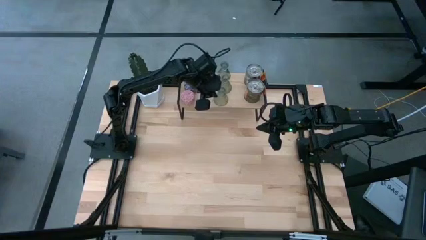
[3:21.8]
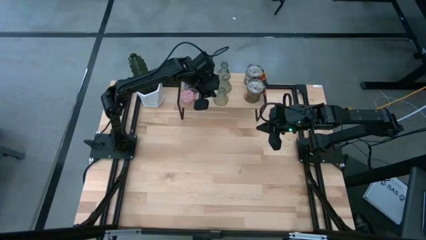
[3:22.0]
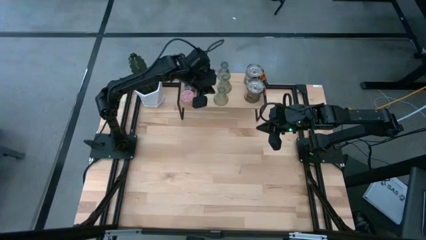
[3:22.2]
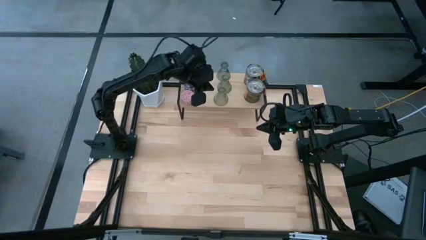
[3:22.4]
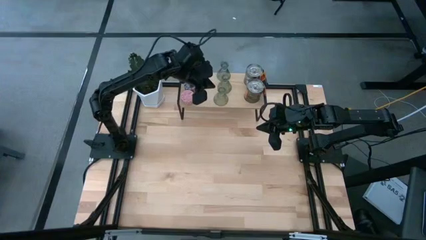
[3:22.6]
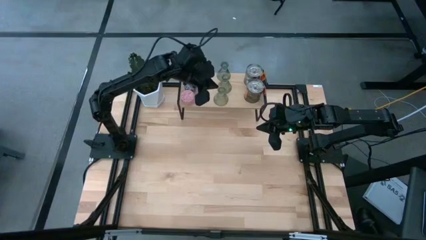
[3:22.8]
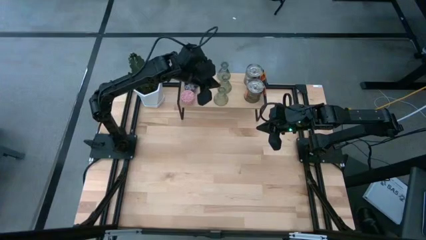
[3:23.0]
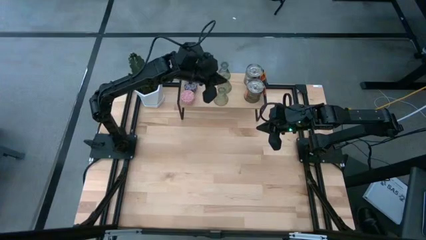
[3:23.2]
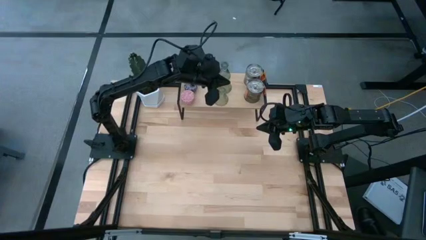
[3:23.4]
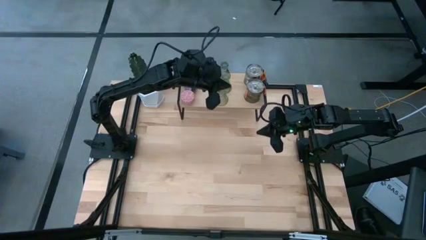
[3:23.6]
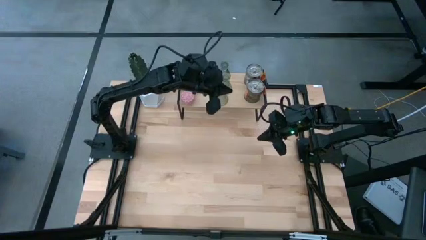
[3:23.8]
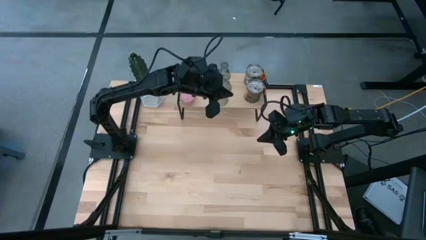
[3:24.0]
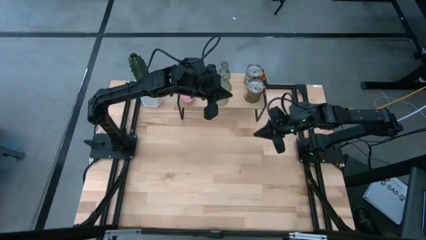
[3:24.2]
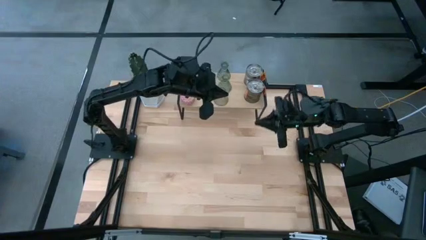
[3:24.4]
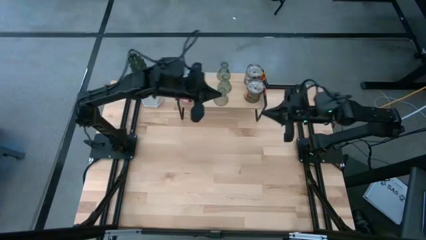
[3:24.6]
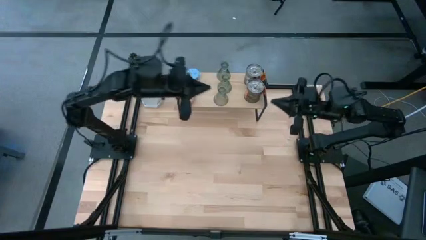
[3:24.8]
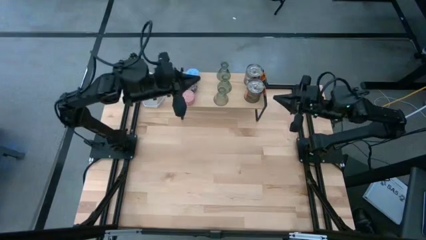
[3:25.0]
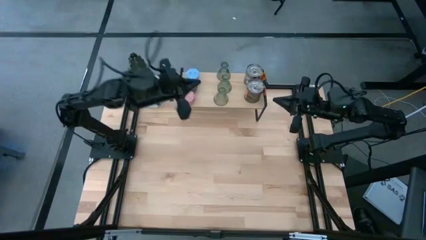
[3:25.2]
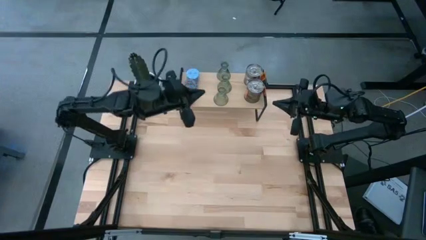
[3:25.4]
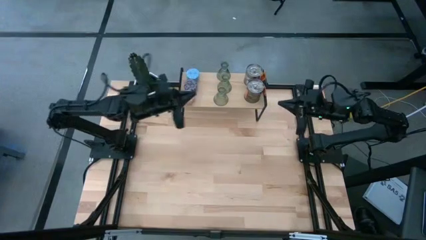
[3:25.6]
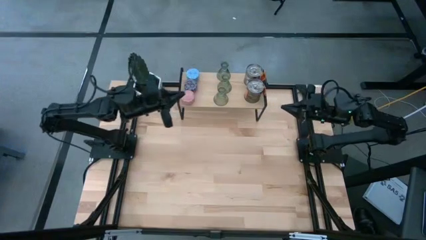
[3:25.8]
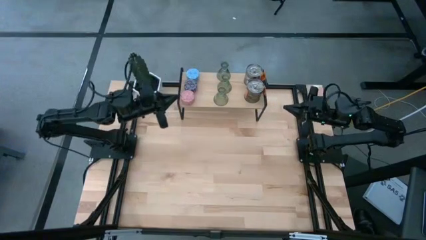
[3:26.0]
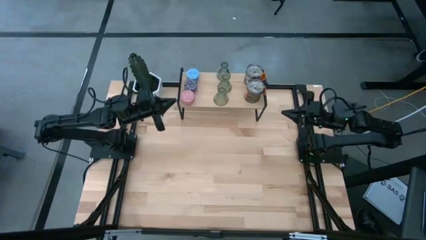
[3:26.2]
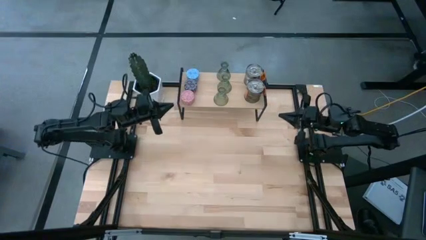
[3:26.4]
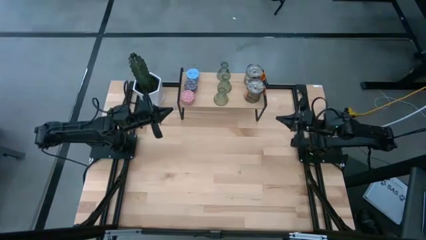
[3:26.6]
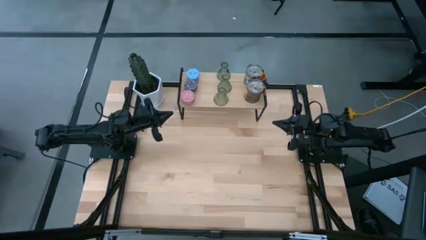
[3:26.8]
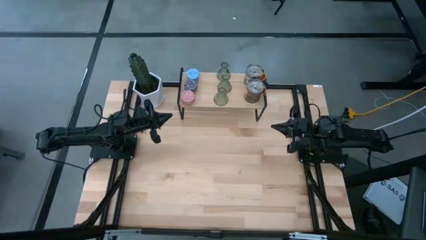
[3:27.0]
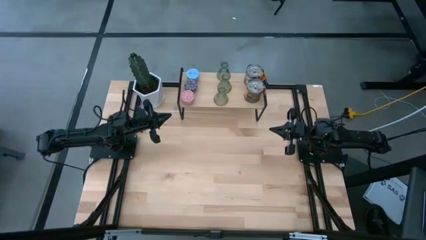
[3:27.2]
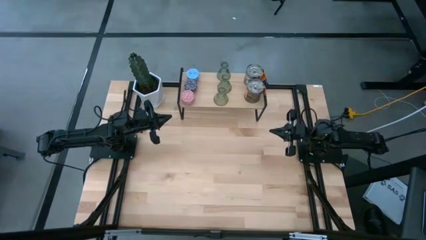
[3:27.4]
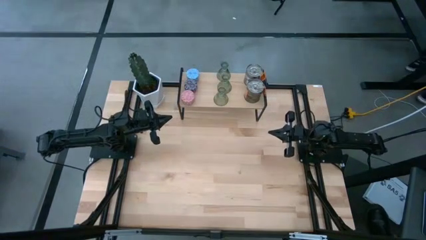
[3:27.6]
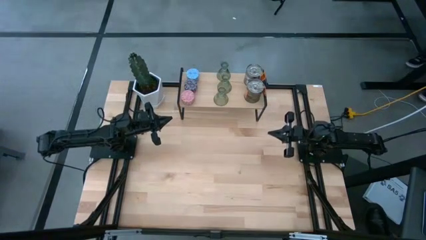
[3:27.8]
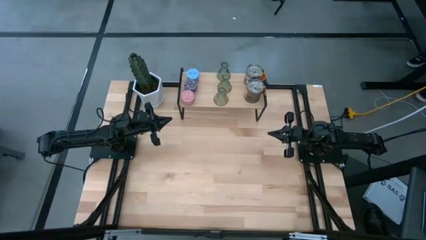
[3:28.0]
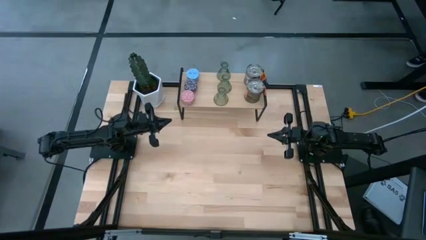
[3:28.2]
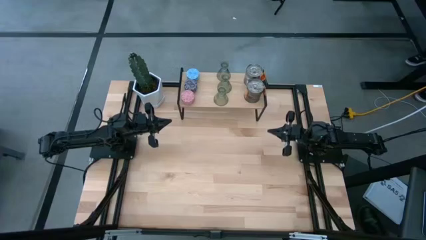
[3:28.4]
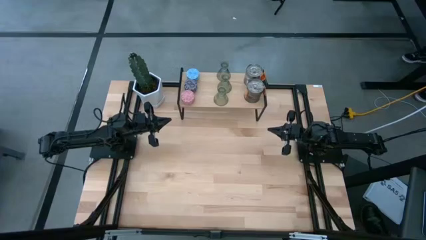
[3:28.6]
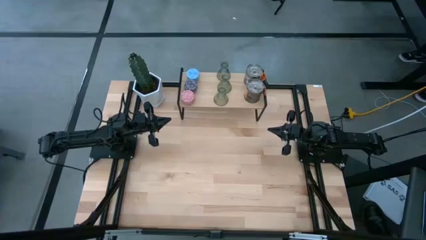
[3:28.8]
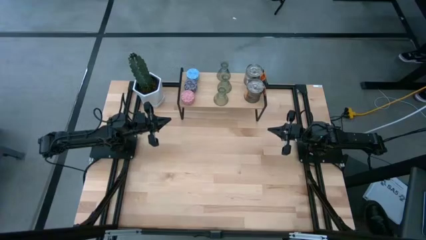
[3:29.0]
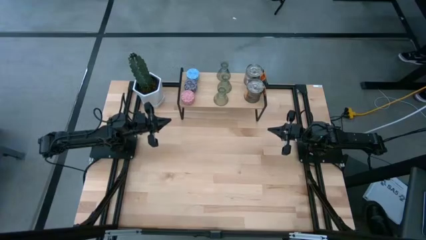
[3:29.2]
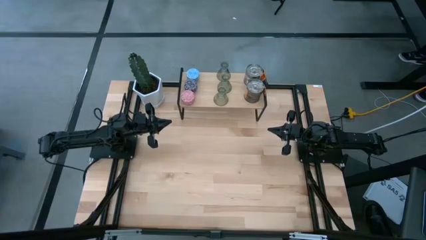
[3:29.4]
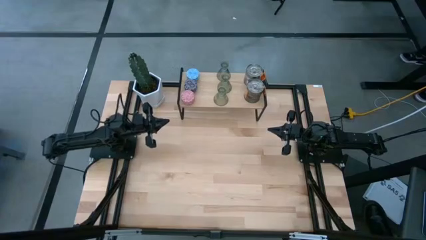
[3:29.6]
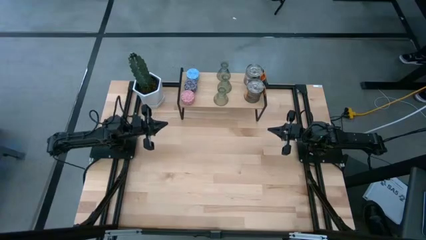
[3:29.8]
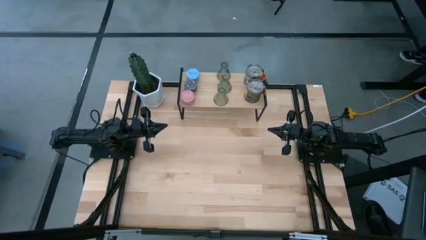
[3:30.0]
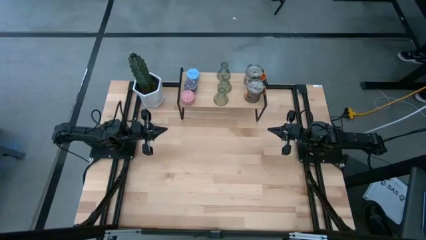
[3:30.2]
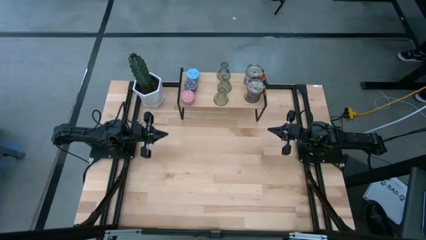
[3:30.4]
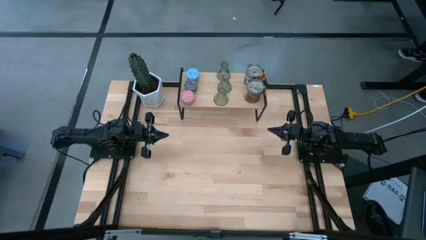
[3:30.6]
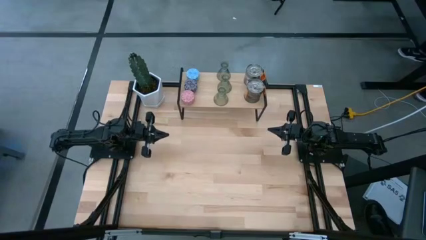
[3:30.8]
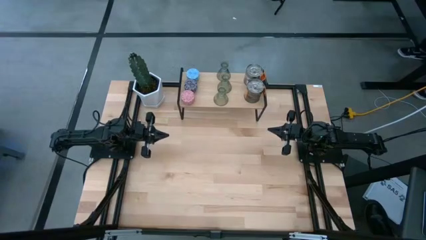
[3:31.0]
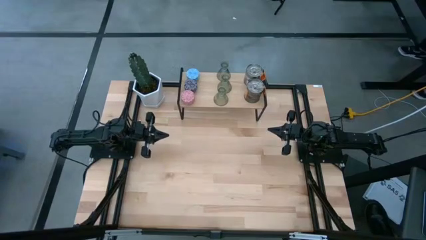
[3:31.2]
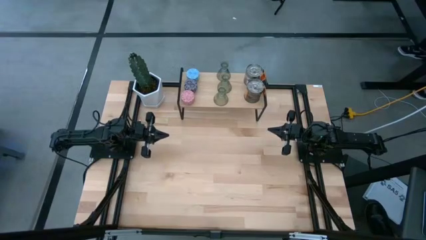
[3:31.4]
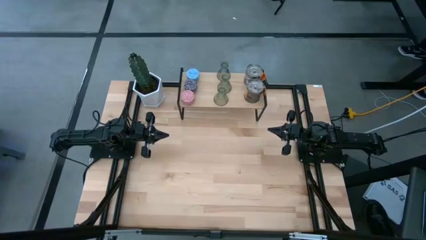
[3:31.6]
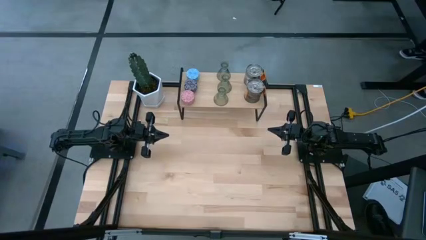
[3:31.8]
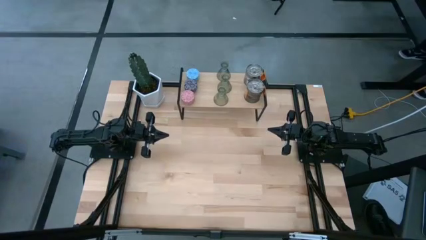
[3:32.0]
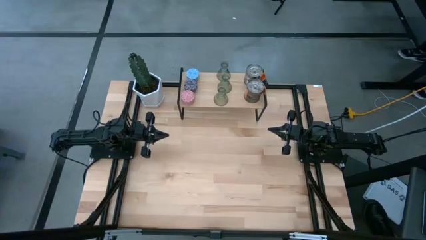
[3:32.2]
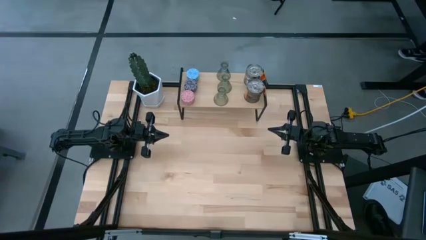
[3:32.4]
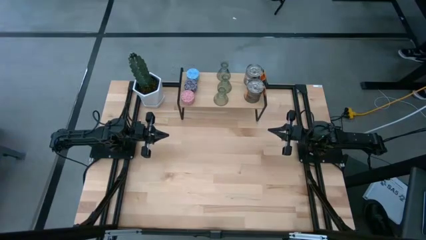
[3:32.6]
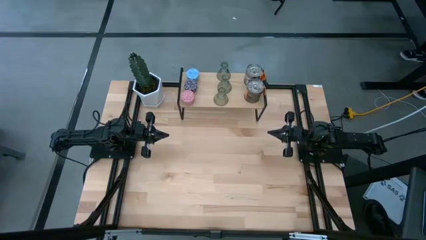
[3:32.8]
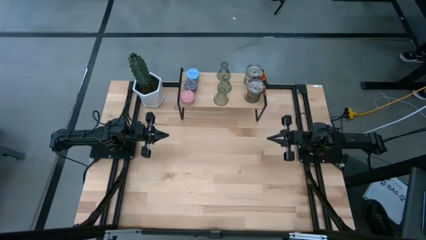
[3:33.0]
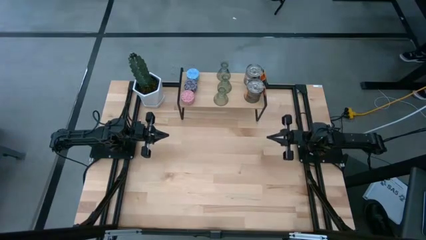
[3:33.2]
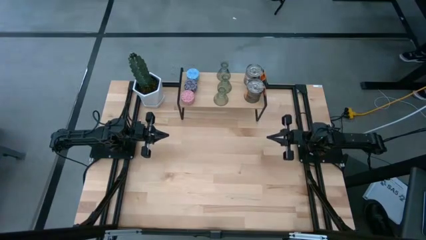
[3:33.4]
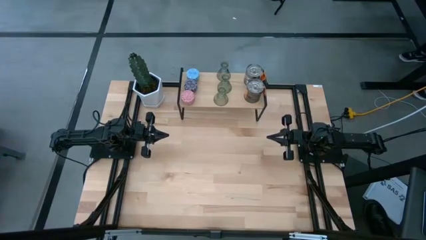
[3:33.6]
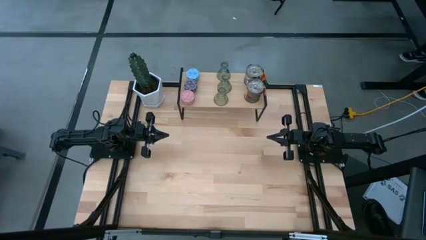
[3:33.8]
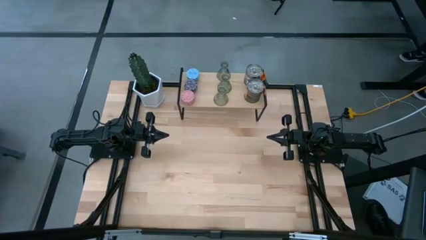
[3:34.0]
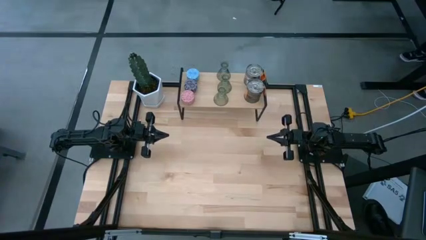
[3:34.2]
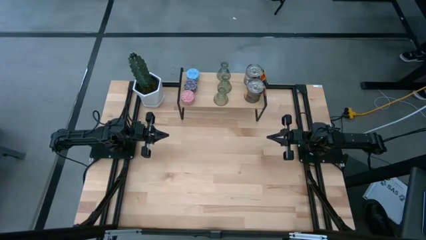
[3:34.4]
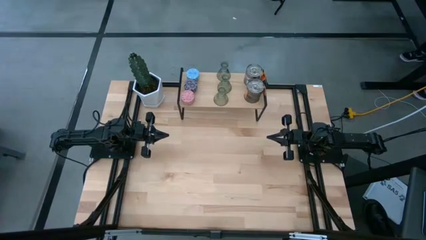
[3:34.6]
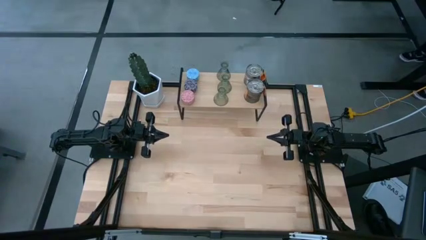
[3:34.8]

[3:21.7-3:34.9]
Task: Pick & Place candle stick holders
Return to Home Position
